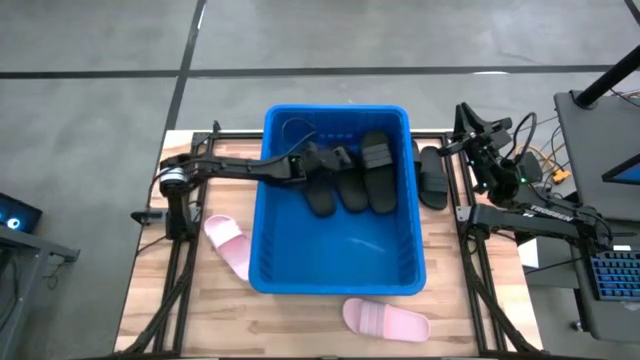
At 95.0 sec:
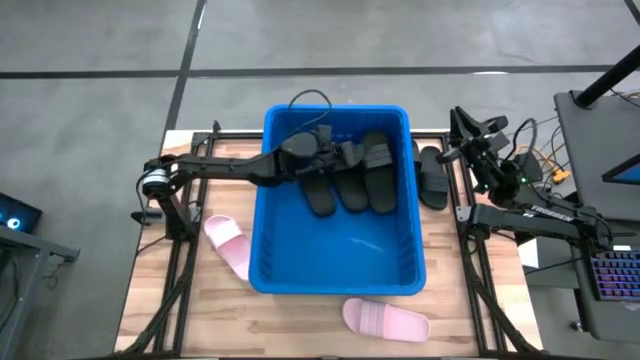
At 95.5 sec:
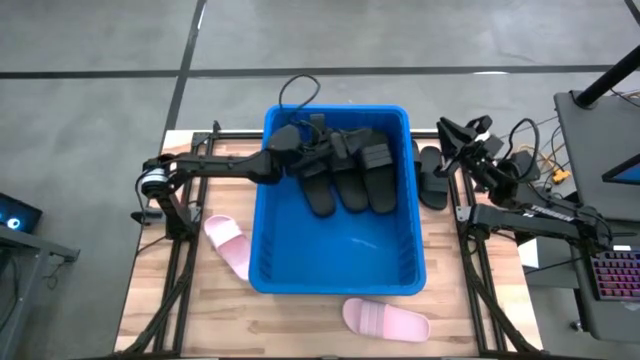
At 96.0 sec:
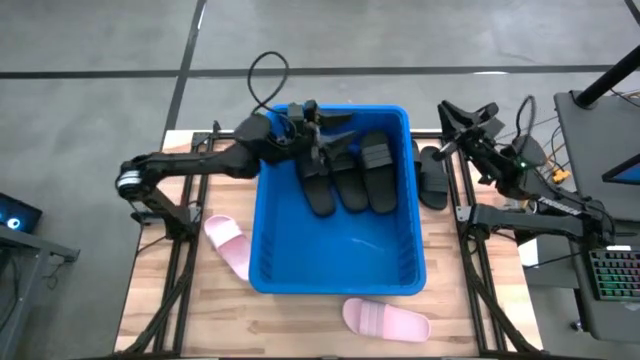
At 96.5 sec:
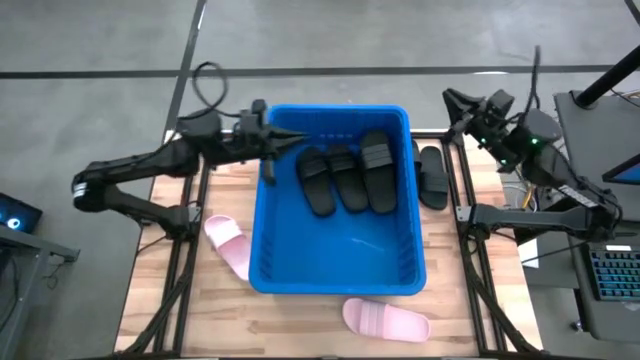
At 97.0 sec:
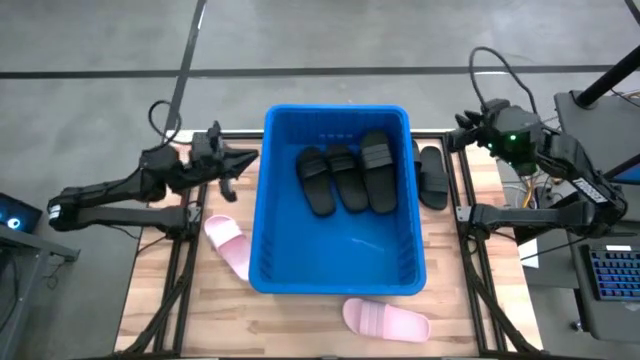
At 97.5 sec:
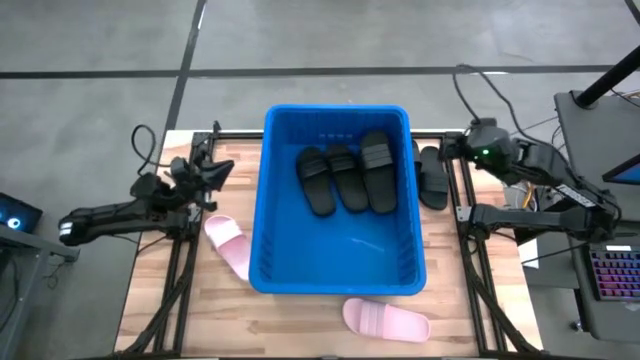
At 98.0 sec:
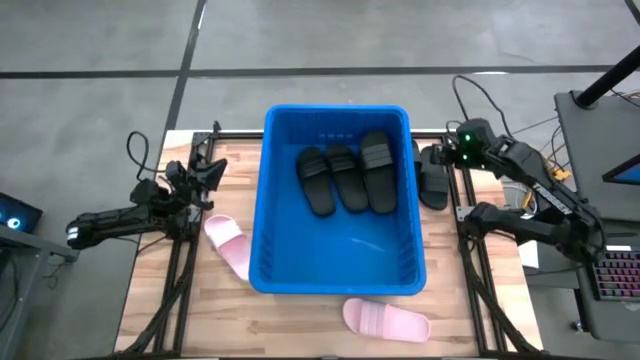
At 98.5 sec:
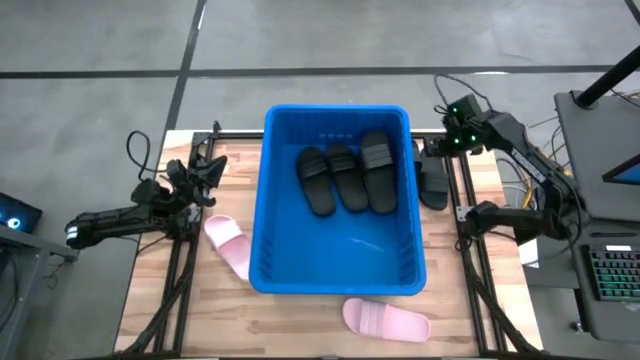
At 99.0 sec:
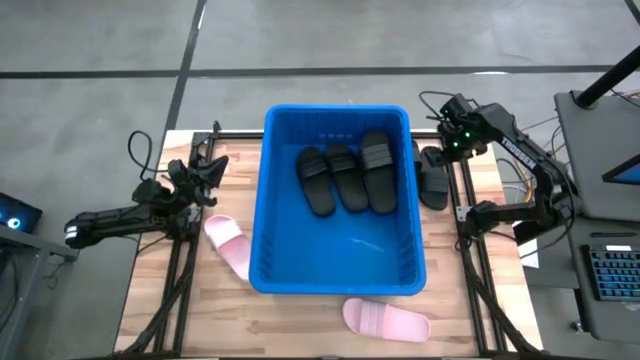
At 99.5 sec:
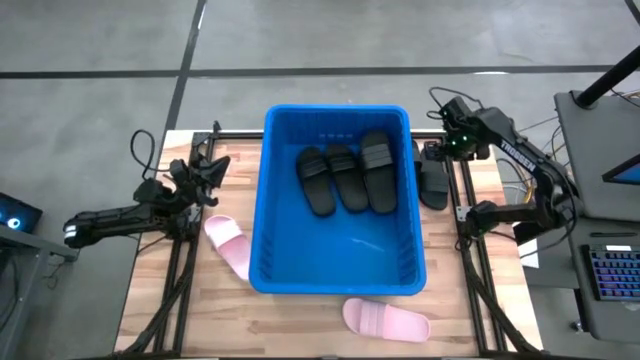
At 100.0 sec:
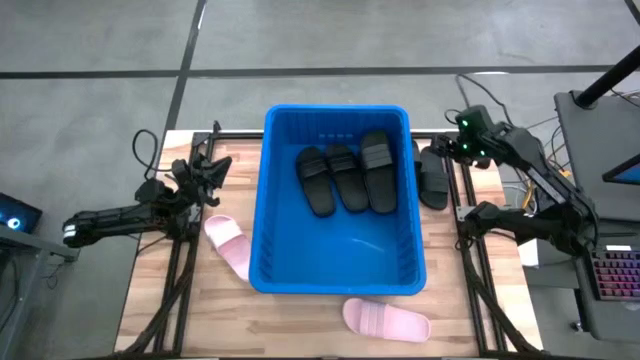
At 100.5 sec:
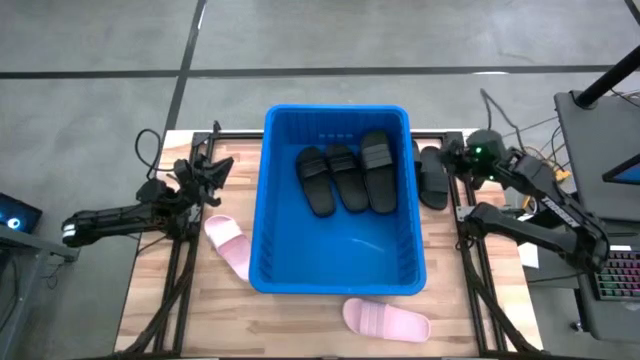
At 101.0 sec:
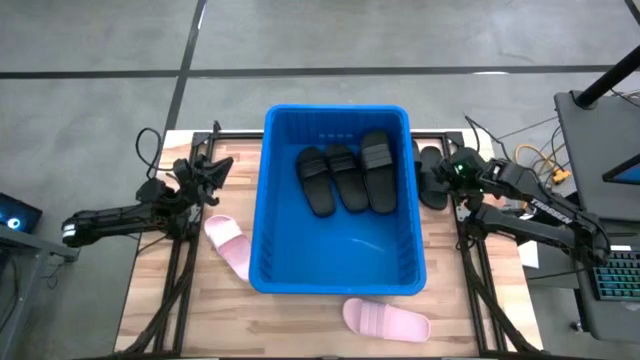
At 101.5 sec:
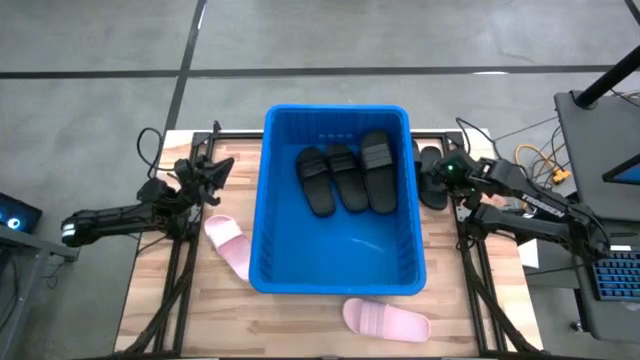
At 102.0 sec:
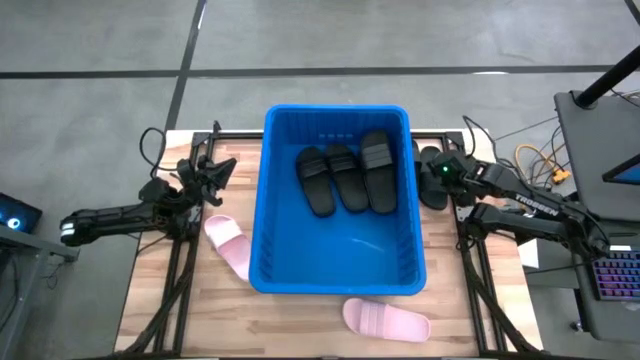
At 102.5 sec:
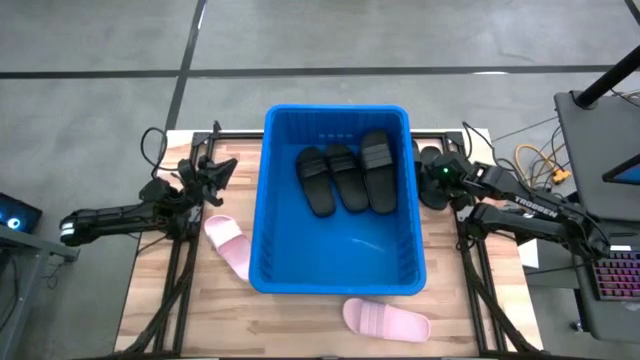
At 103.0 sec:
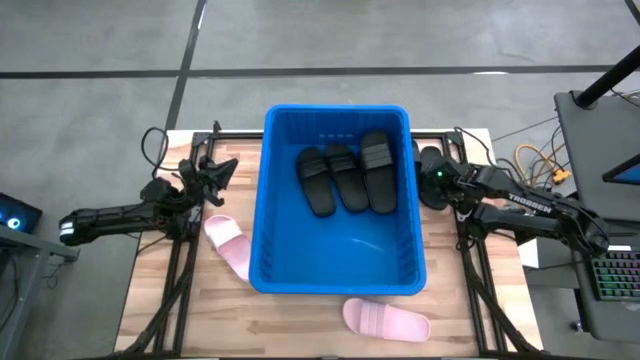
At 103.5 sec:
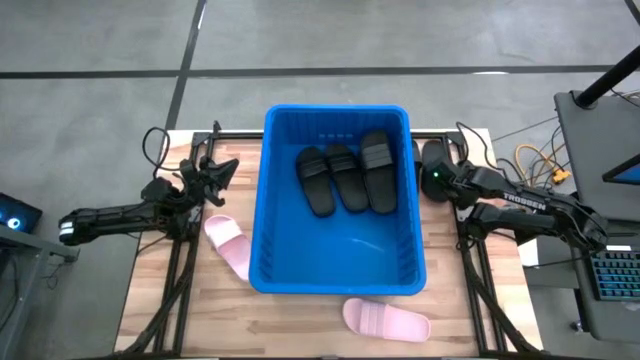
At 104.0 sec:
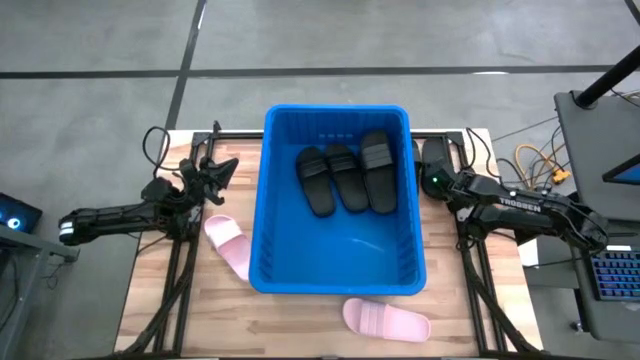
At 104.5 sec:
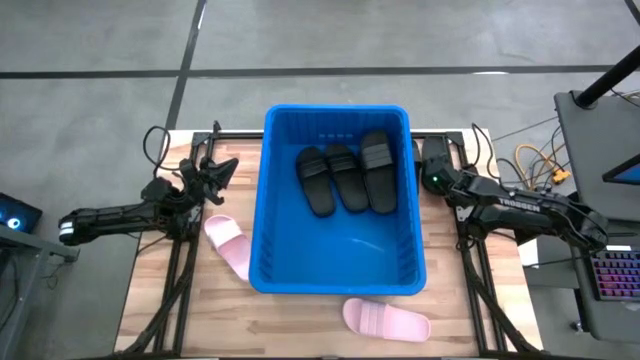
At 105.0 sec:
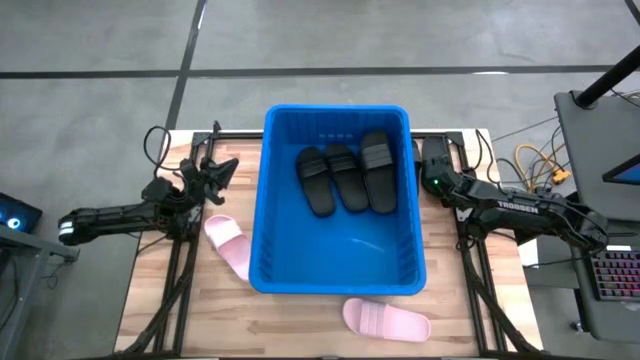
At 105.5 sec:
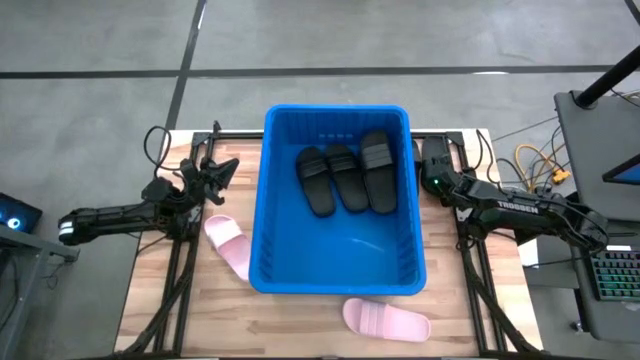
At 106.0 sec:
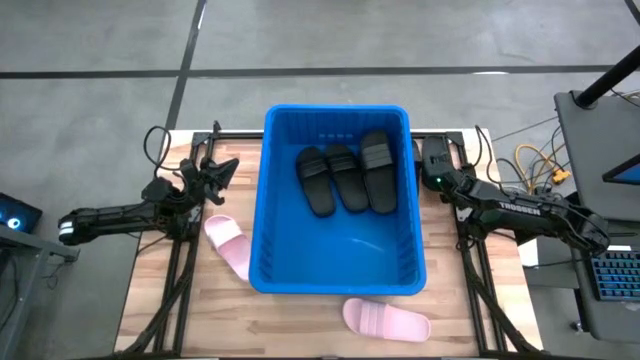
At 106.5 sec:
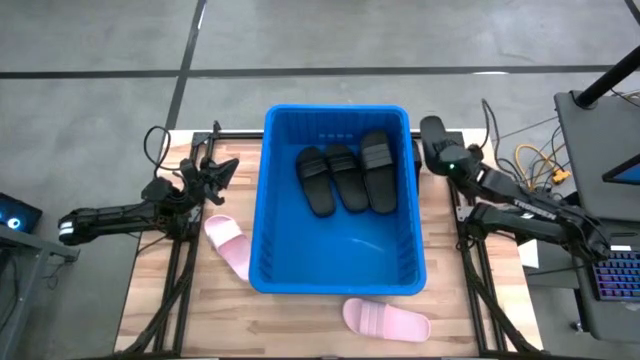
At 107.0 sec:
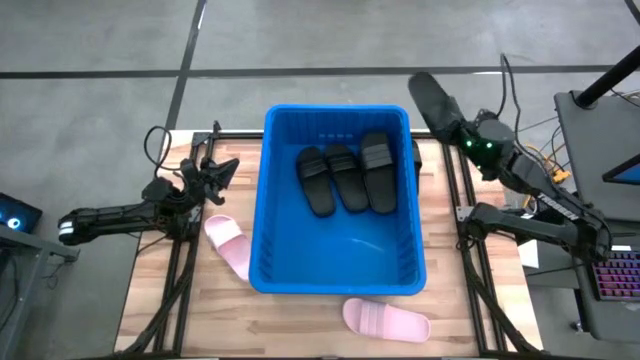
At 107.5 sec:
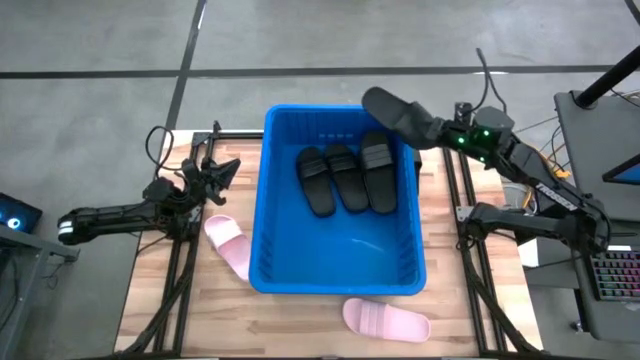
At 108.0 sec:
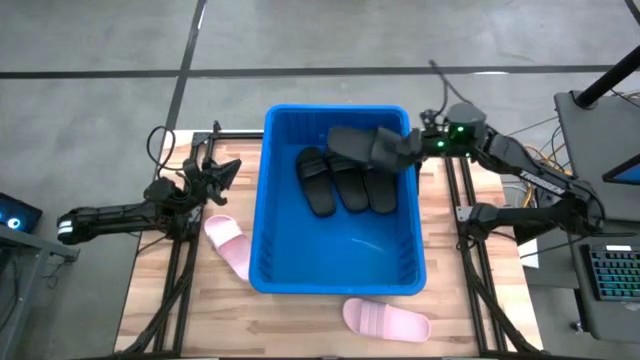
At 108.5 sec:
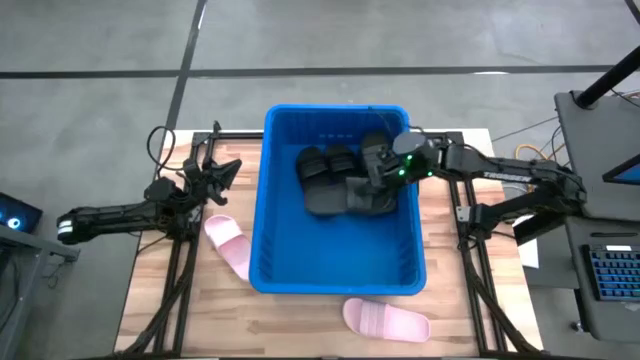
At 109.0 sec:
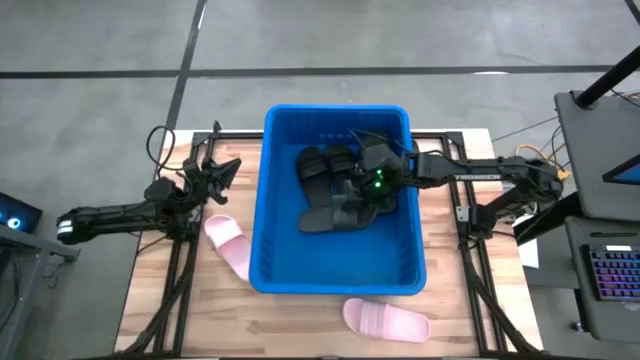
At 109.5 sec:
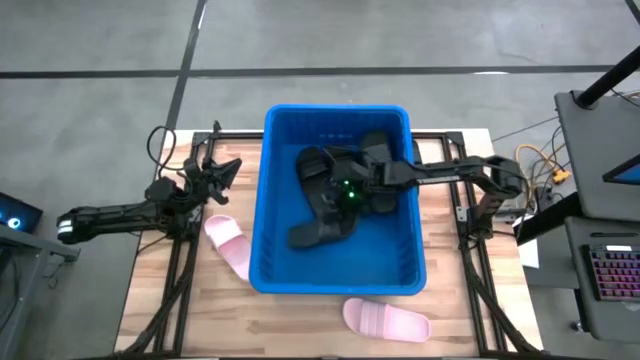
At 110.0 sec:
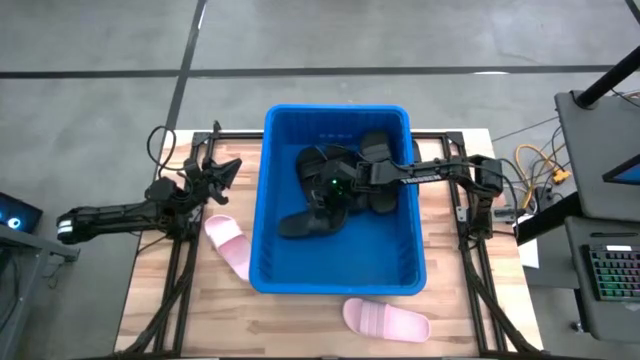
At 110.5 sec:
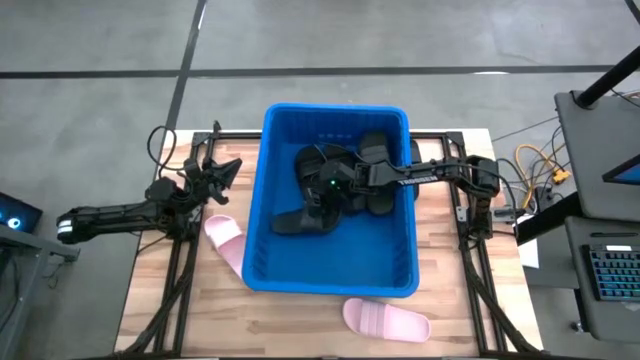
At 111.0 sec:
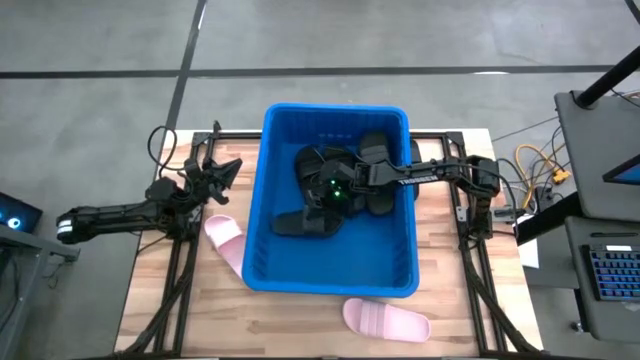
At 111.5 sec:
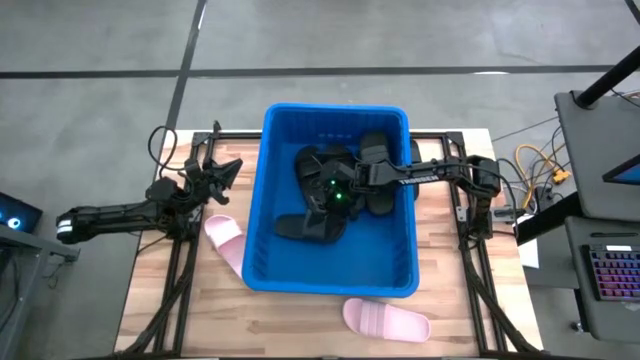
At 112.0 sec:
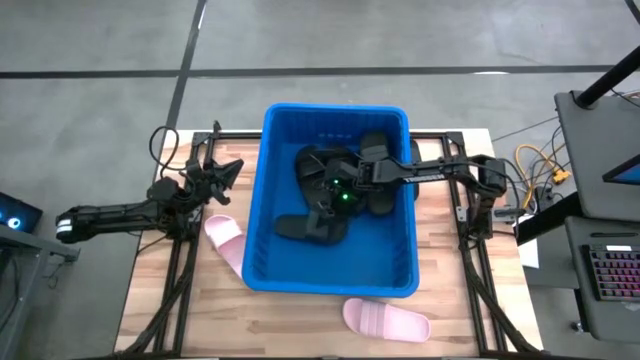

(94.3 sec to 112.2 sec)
Task: Pick and place slides into bin
Put the black slides into the blue organizer bin
